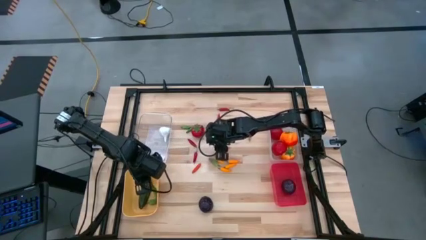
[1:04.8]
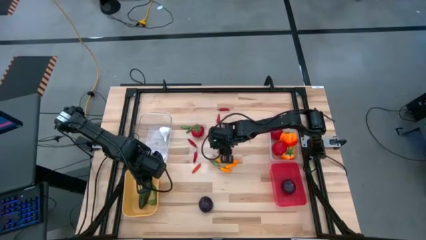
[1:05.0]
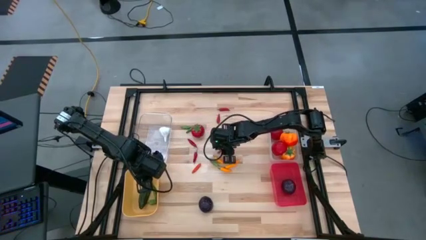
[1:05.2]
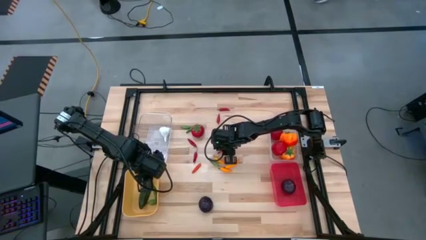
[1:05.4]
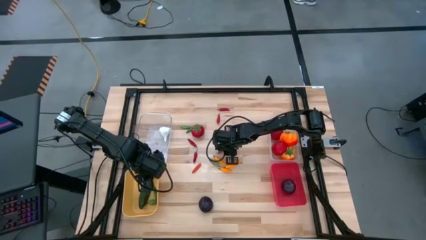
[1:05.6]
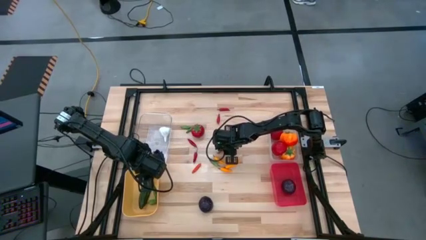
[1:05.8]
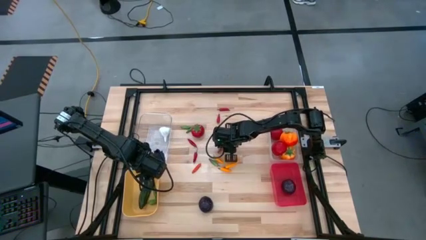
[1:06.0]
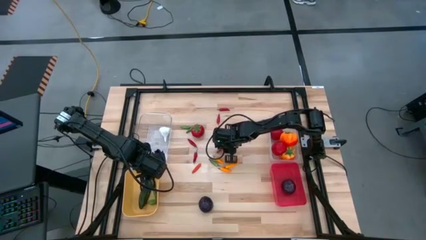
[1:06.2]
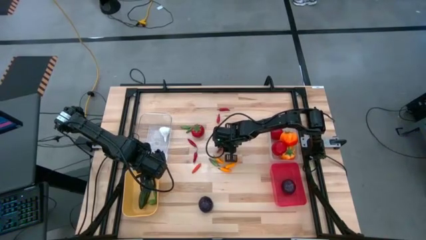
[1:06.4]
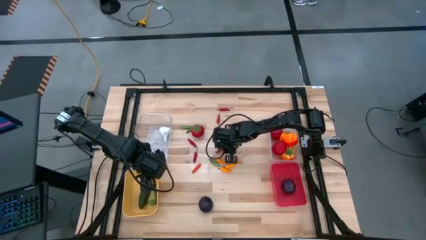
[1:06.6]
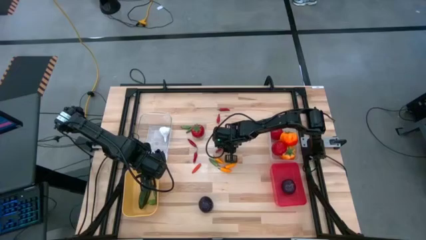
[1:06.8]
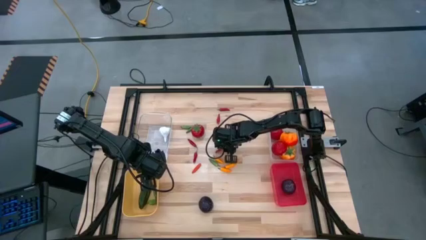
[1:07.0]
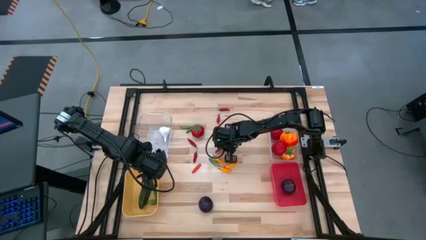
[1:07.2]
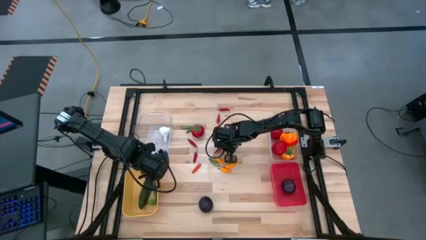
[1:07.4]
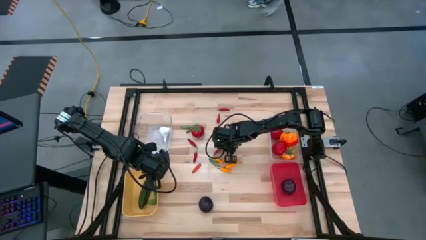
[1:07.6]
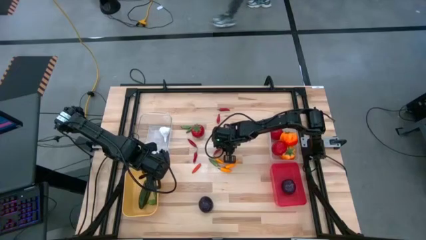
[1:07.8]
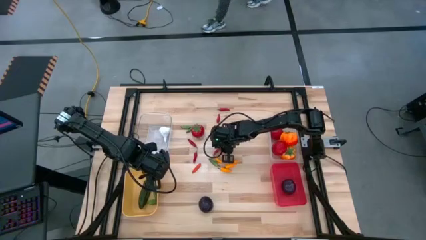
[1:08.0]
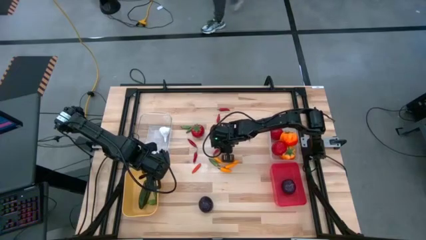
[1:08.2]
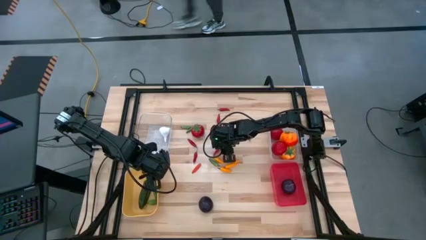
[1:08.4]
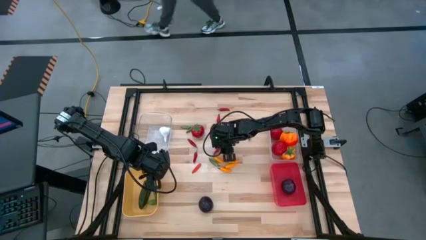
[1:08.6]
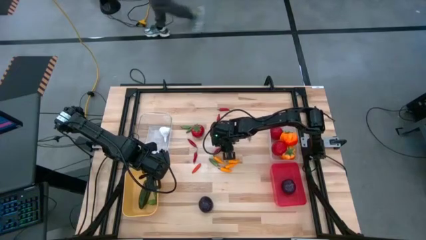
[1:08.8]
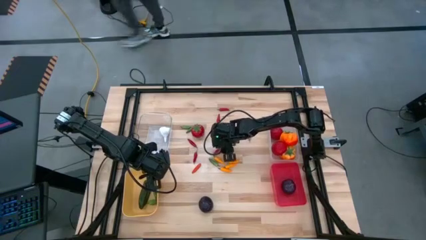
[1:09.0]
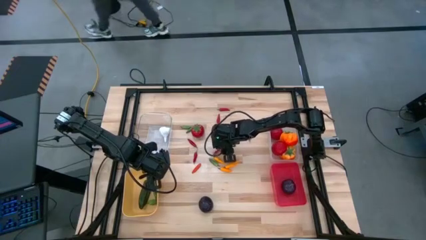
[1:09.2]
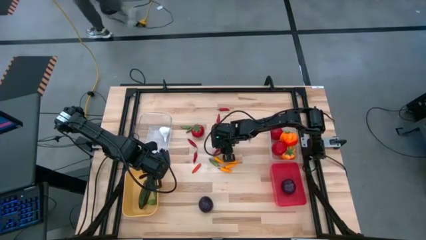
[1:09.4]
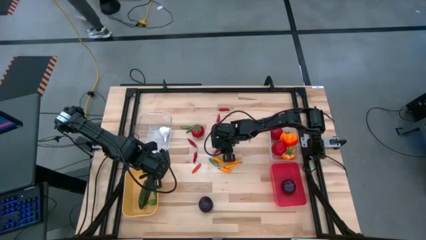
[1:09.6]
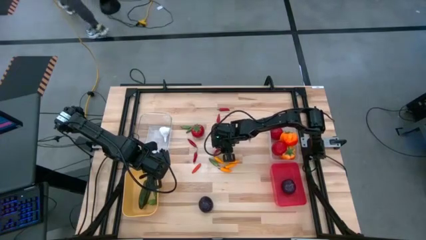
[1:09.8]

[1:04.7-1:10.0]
Task: Sort produce into baskets
Put the red chili pepper into the yellow bin

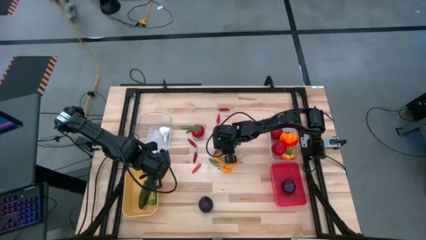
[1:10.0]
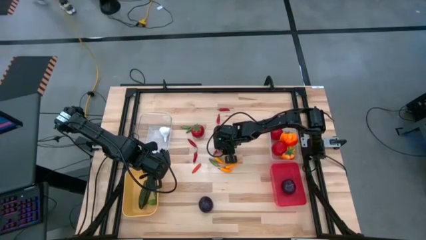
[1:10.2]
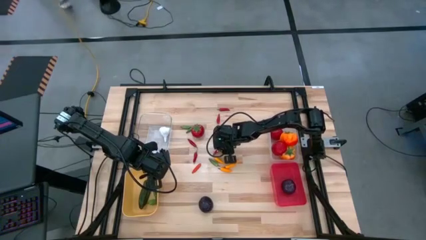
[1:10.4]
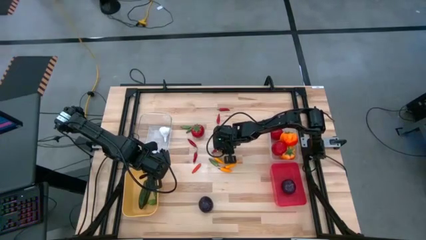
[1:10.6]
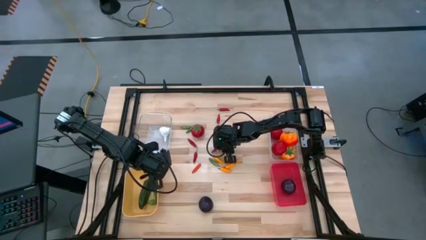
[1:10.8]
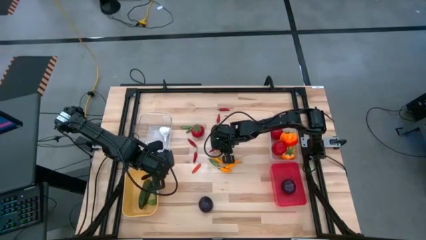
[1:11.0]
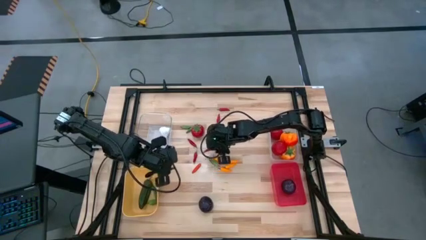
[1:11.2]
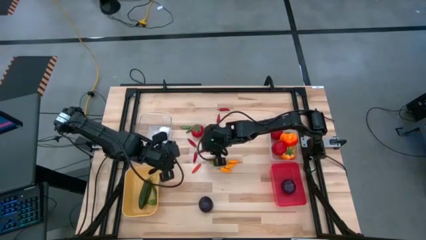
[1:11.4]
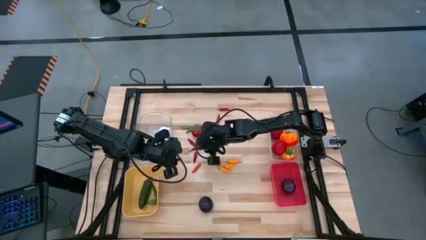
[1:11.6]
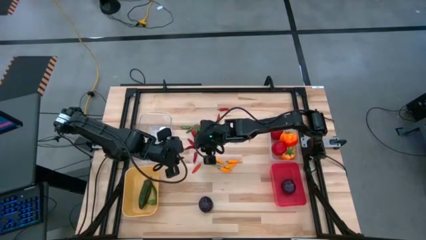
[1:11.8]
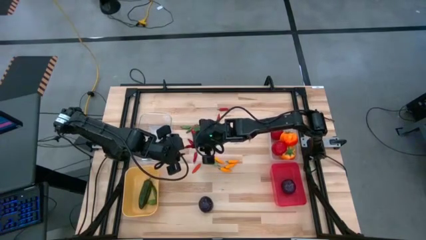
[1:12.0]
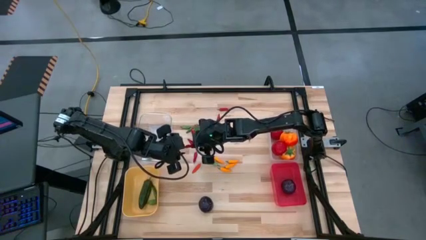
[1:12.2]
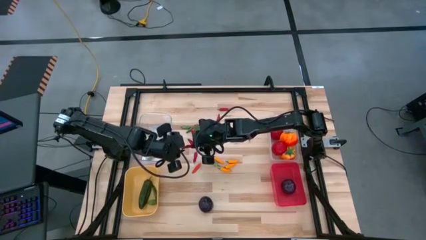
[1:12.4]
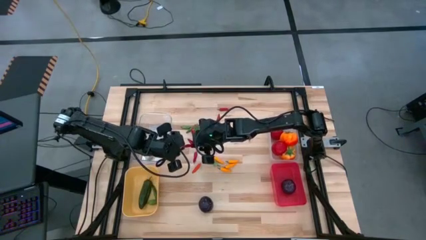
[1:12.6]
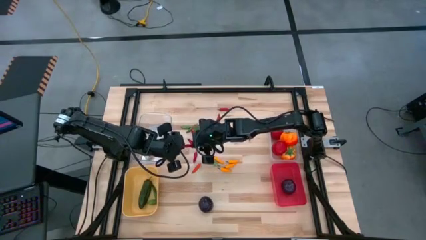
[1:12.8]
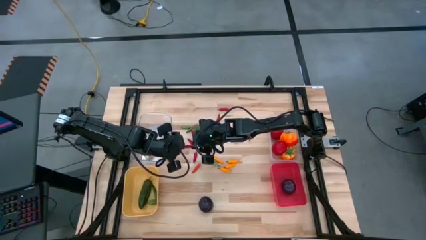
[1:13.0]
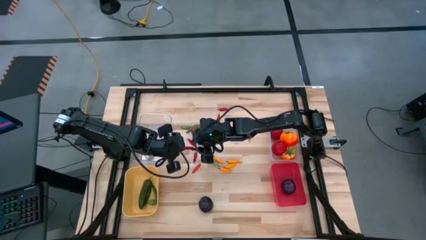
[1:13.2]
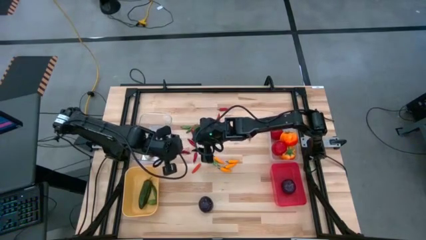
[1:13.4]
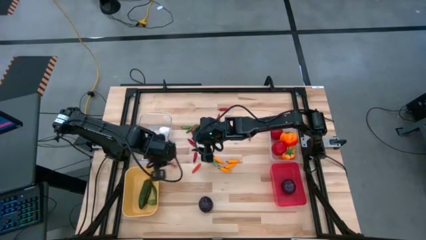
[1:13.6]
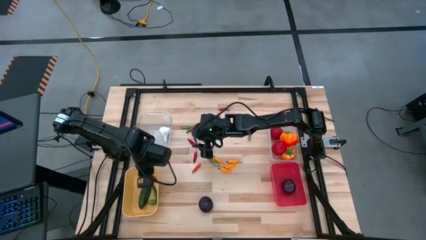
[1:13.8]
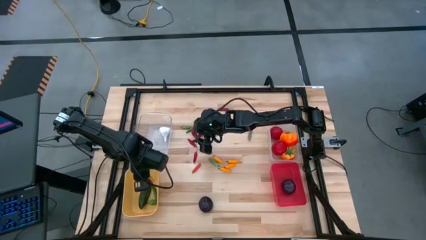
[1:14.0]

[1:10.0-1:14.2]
Put the red chili pepper into the yellow bin

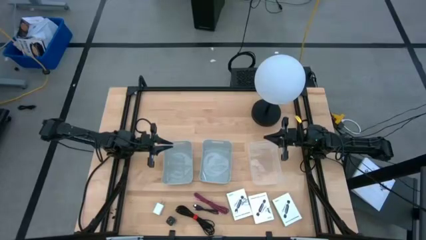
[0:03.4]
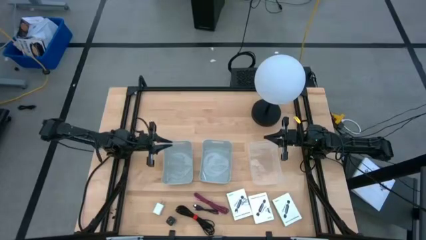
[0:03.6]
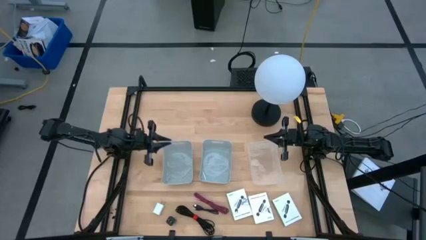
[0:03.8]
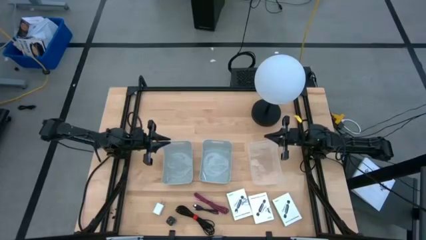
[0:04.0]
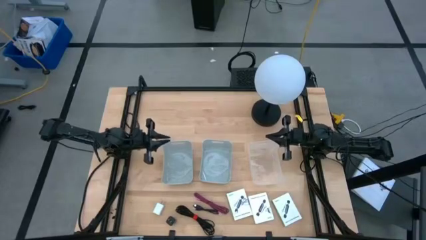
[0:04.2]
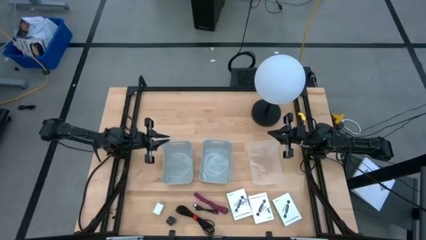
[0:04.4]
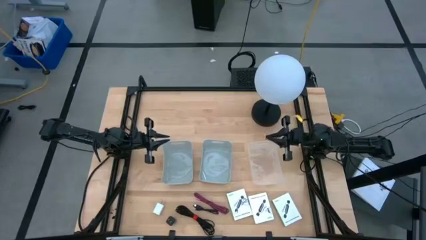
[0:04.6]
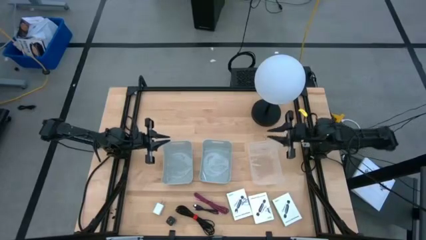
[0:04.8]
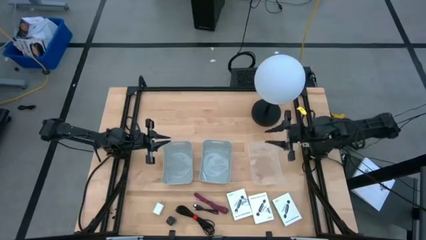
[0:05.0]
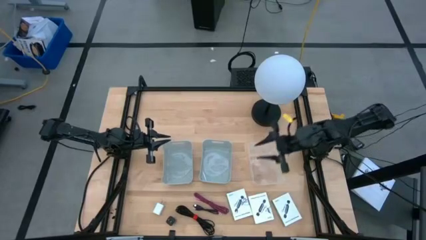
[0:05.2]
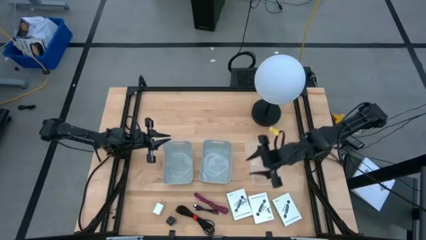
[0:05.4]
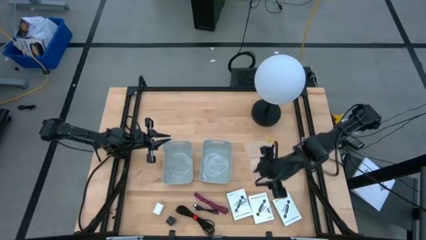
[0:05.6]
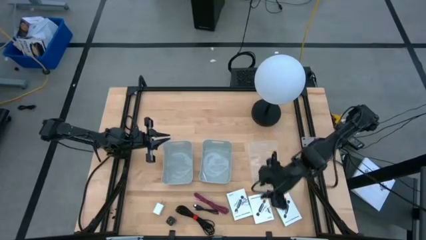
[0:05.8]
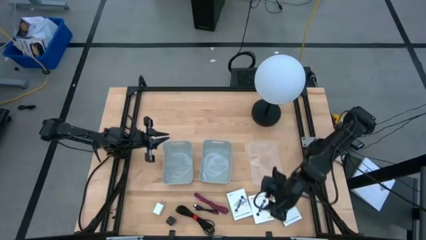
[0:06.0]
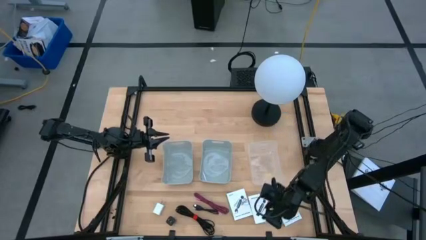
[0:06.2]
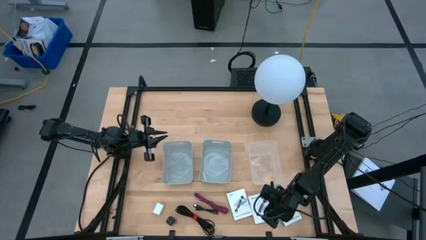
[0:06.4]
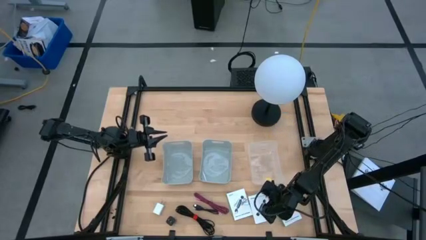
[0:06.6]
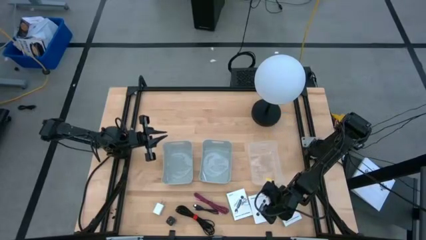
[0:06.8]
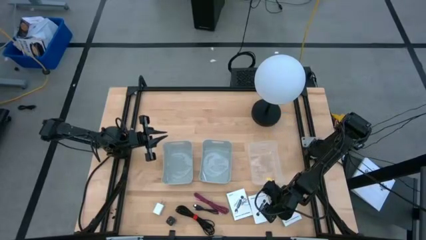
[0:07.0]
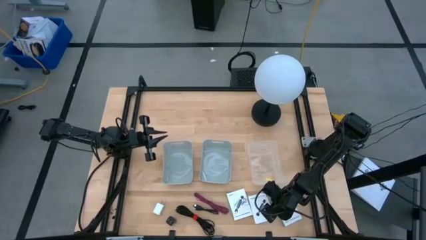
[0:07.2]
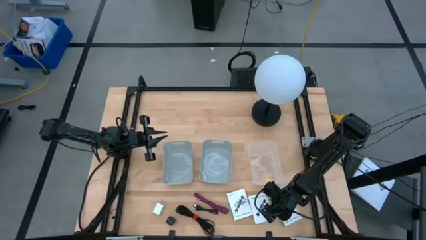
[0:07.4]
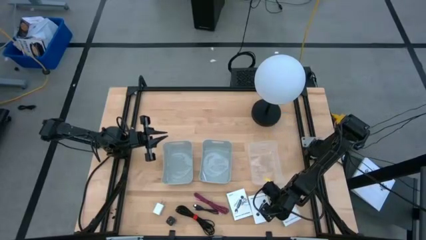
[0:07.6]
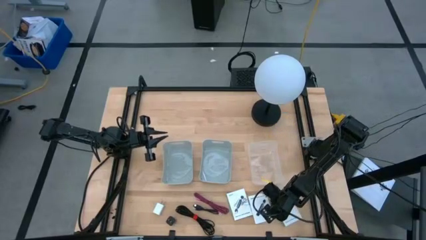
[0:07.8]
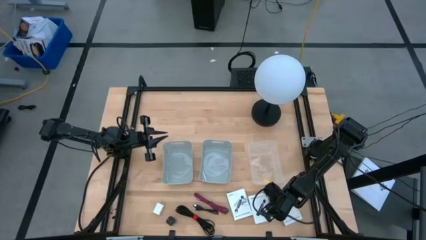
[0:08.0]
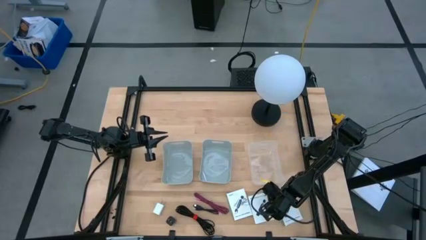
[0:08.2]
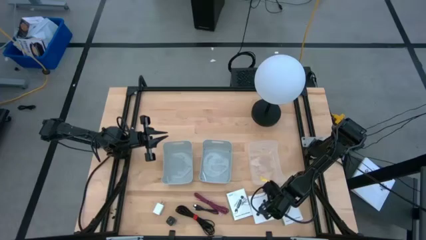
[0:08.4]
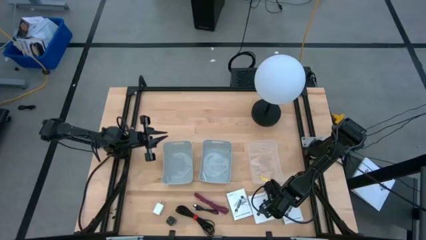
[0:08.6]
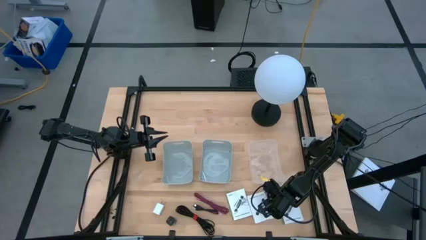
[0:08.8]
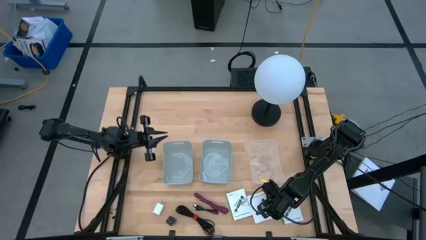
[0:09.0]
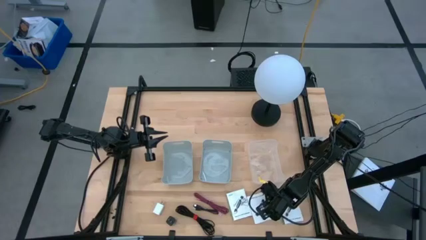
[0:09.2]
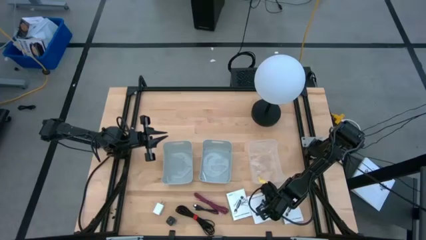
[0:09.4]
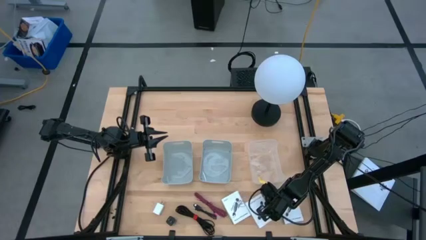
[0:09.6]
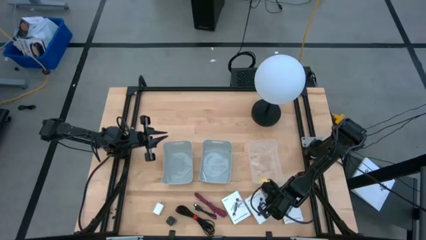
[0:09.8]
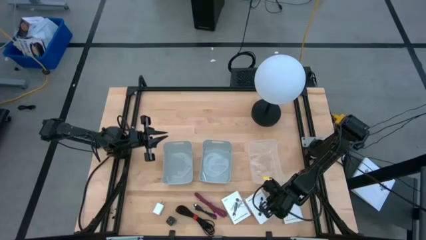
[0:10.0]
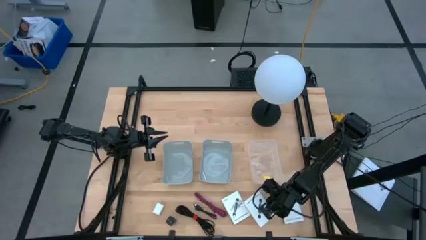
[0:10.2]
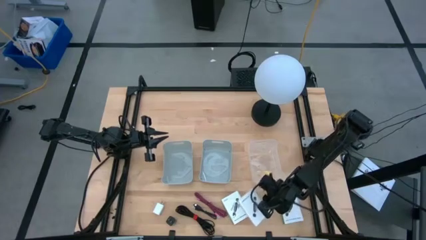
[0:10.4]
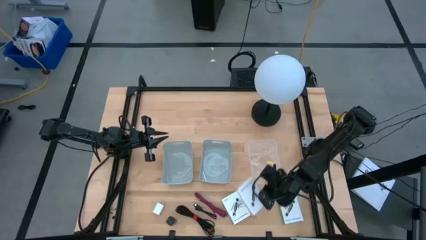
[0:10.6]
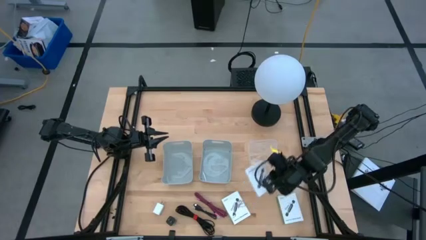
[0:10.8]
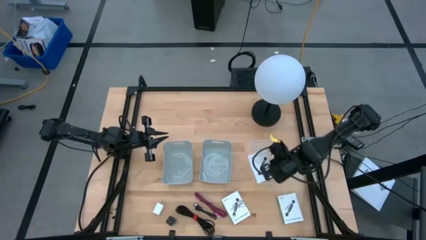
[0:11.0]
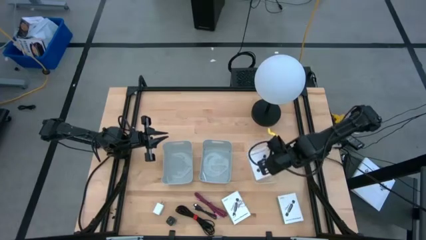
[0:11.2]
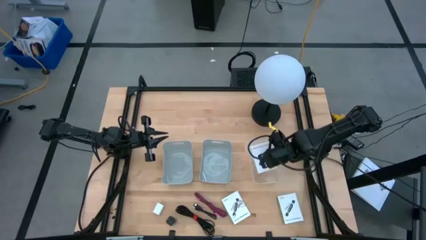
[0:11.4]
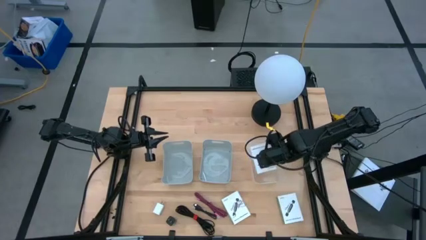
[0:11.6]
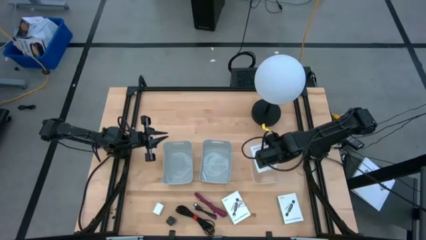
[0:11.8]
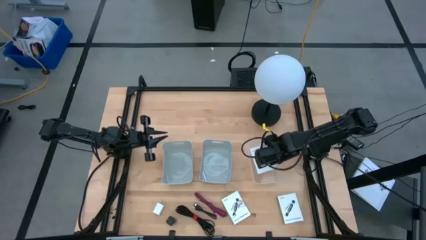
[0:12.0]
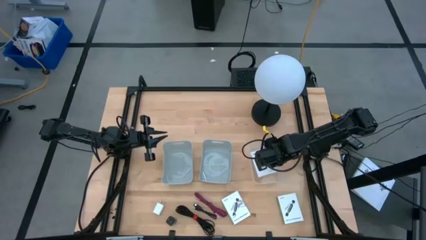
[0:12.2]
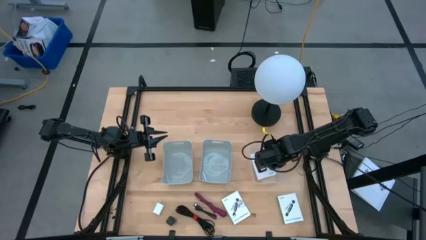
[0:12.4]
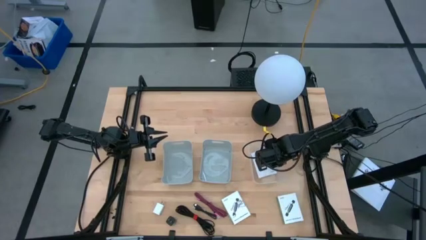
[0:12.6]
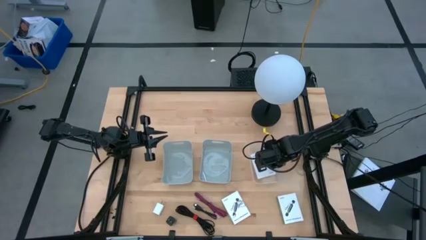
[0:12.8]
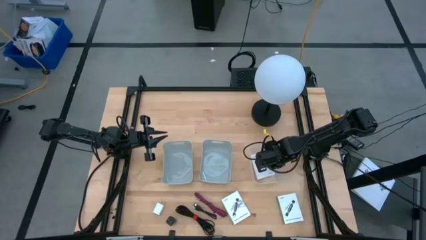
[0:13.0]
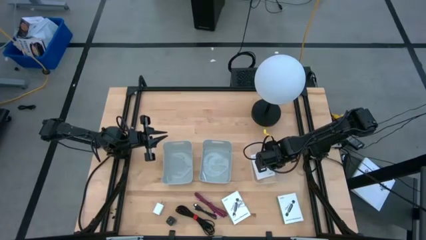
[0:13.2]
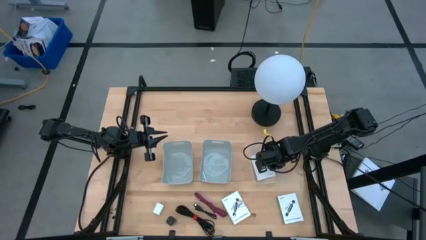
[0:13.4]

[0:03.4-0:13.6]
Task: Pick and place items into bin
Put the middle white card reader box into the transparent bin
